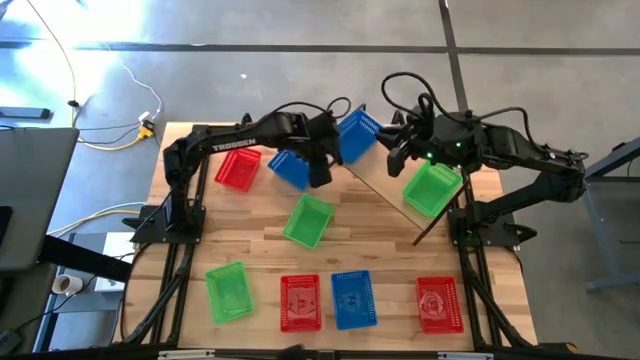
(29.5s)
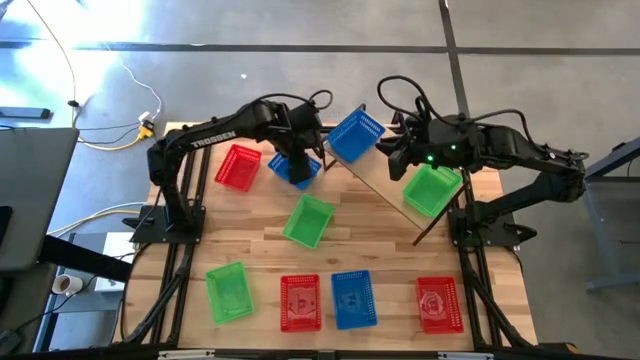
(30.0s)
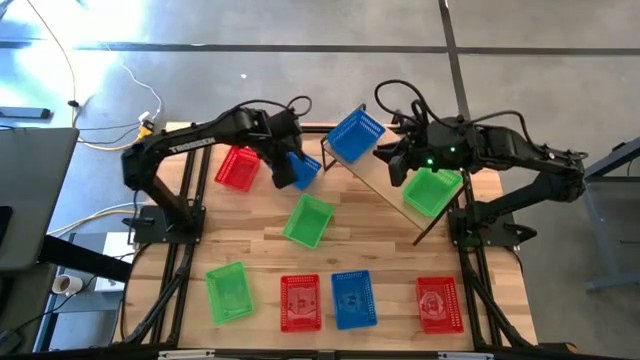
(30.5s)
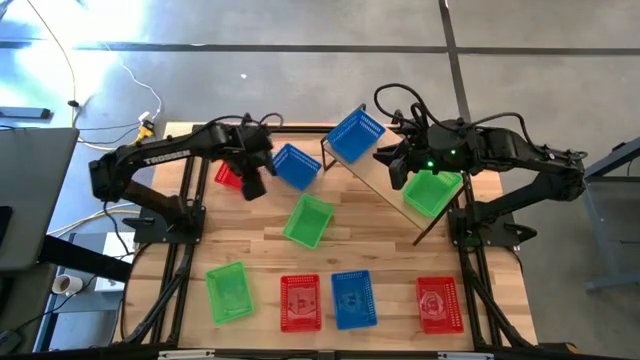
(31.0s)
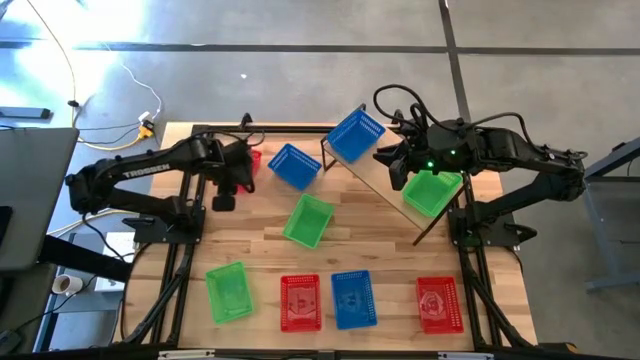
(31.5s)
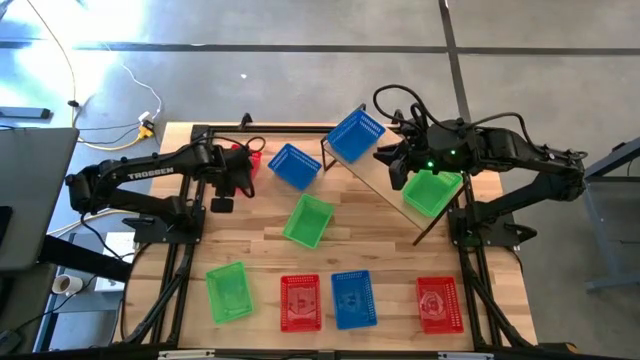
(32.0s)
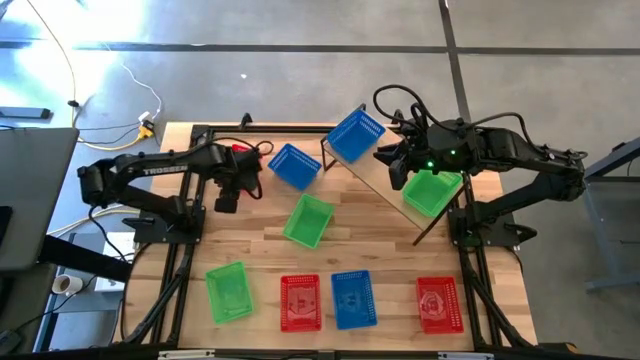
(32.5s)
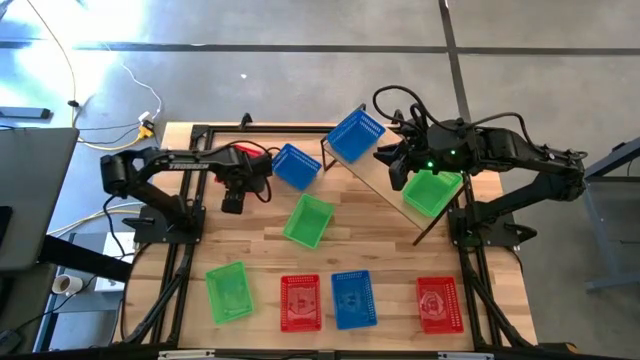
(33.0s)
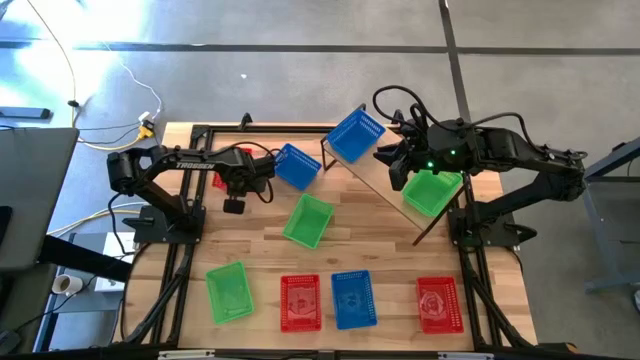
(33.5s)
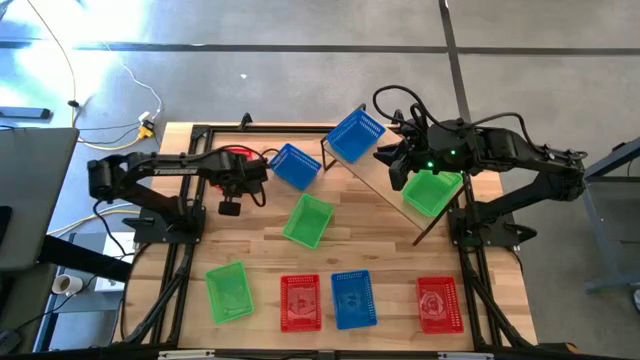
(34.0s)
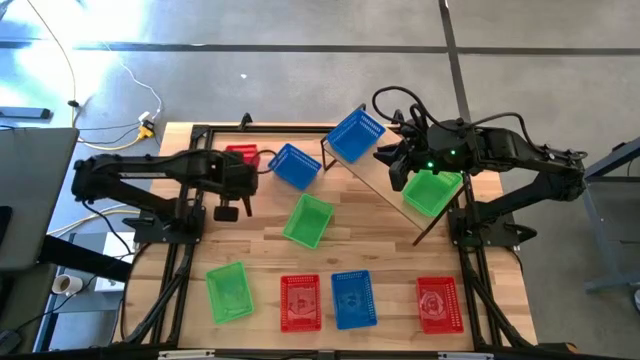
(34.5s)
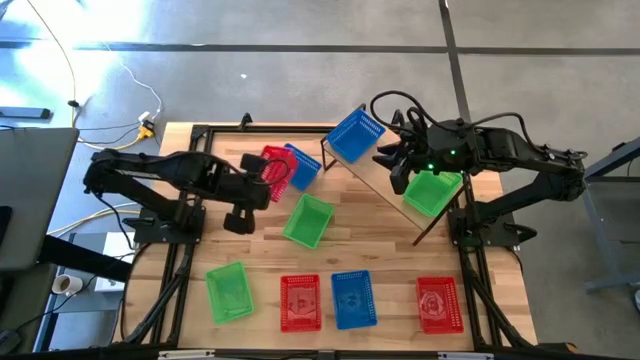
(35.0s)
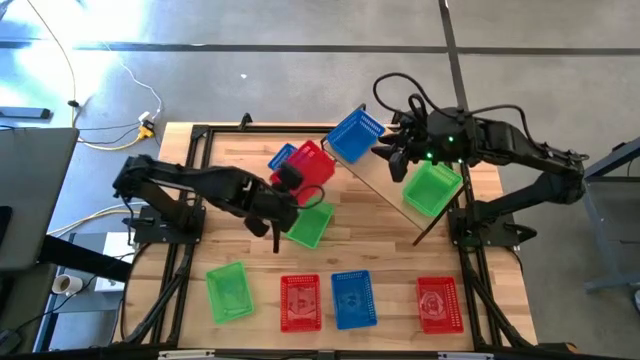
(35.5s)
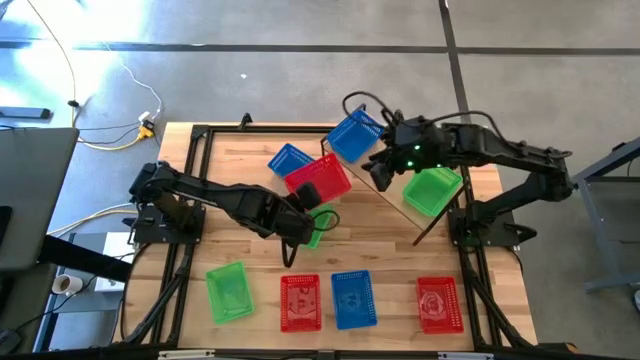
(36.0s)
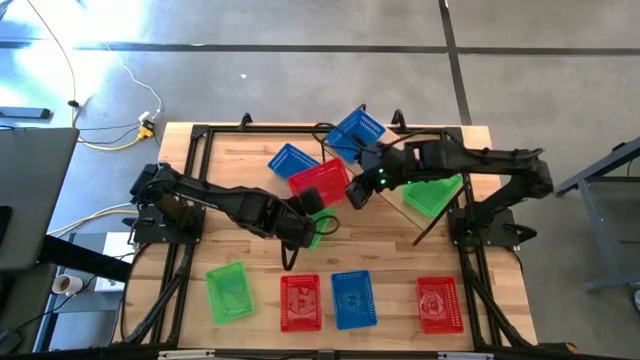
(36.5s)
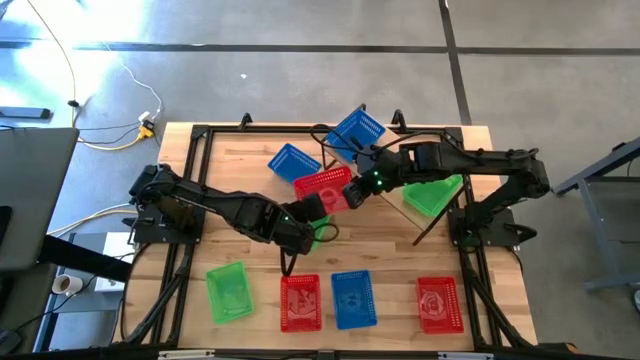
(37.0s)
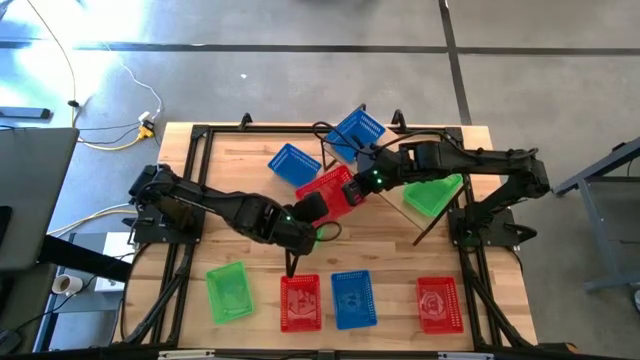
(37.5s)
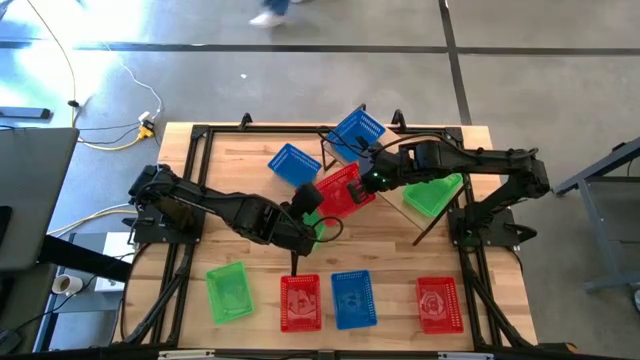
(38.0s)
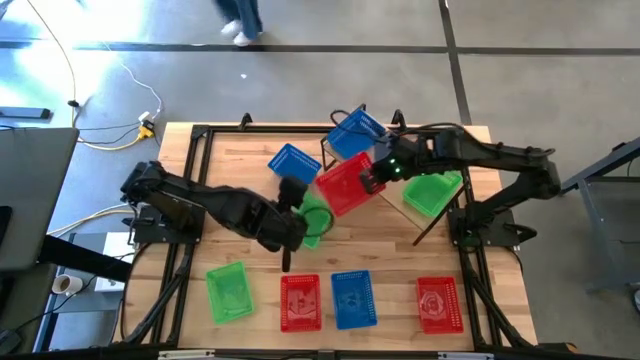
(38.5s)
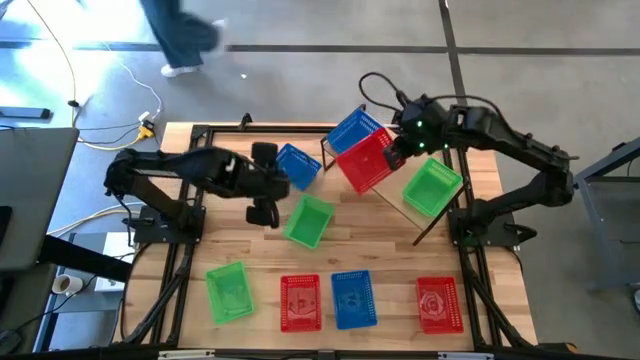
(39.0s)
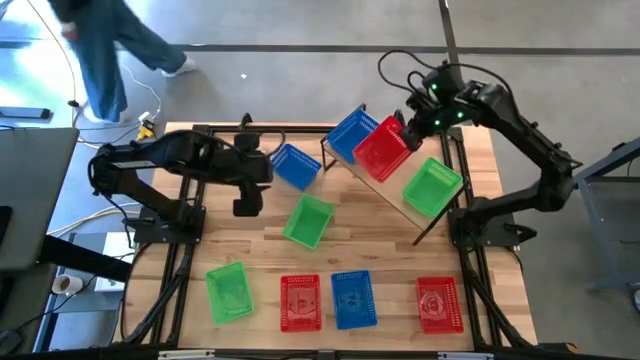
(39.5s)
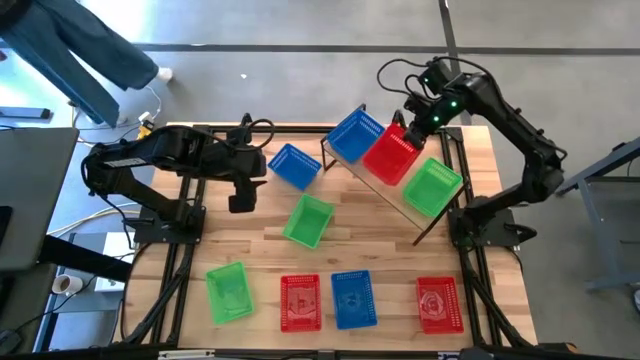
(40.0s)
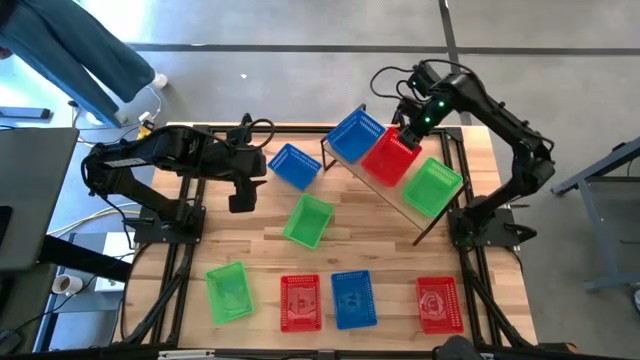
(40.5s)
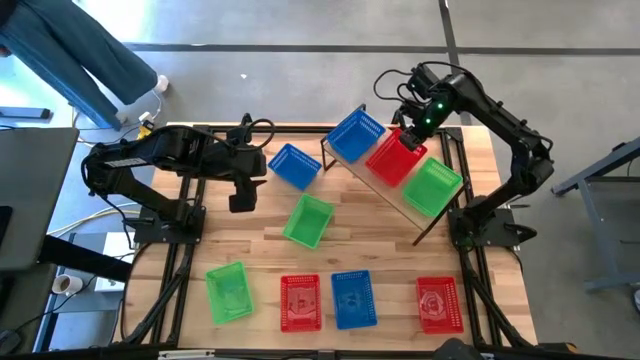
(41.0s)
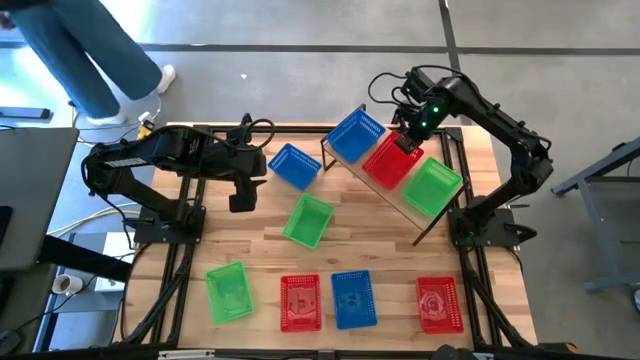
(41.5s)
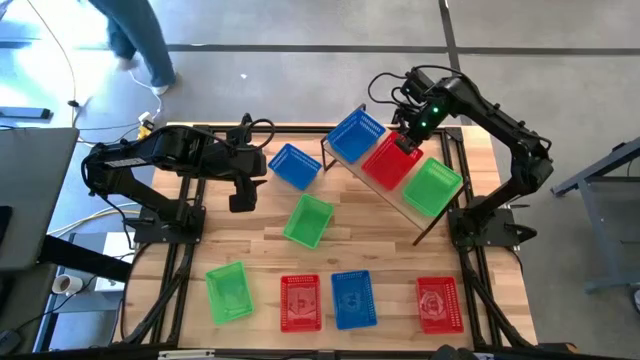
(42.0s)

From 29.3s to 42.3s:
Task: Stack baskets on shelf by color
Put the top red basket on the shelf

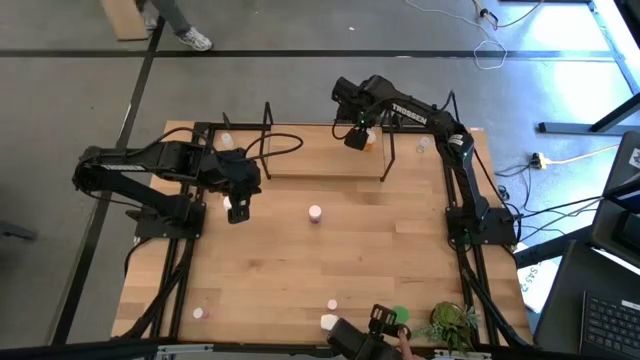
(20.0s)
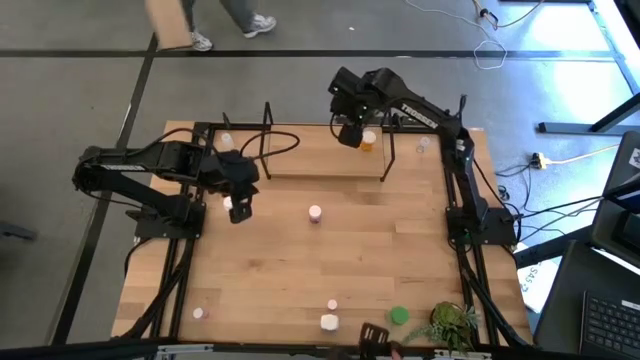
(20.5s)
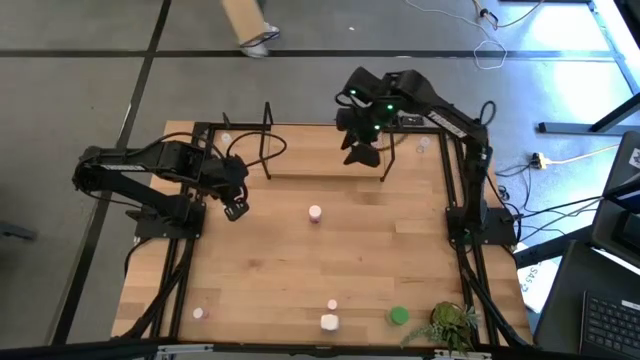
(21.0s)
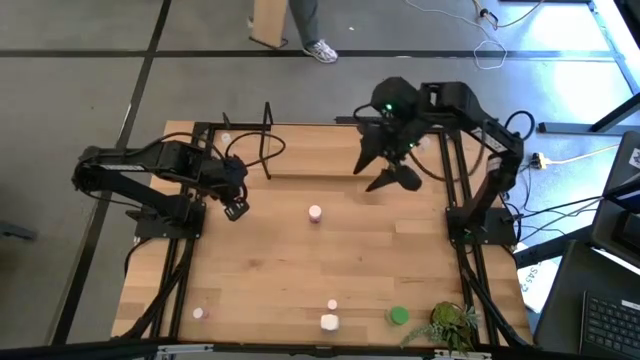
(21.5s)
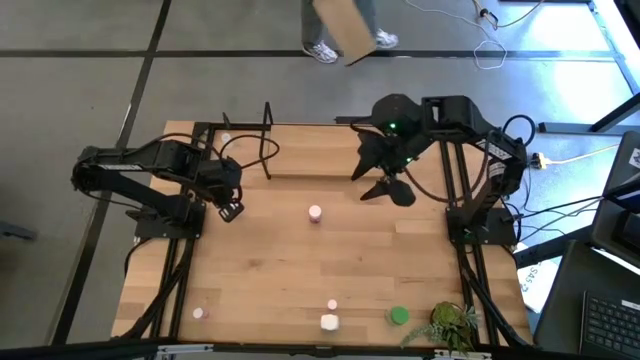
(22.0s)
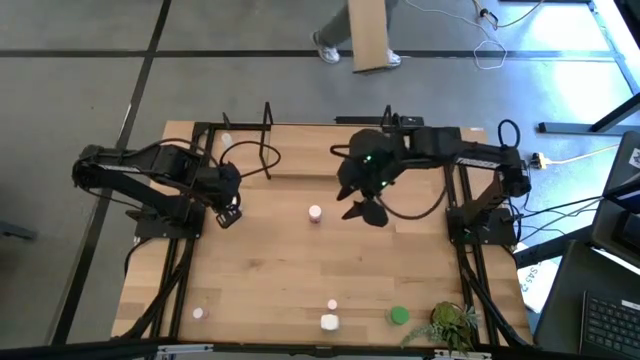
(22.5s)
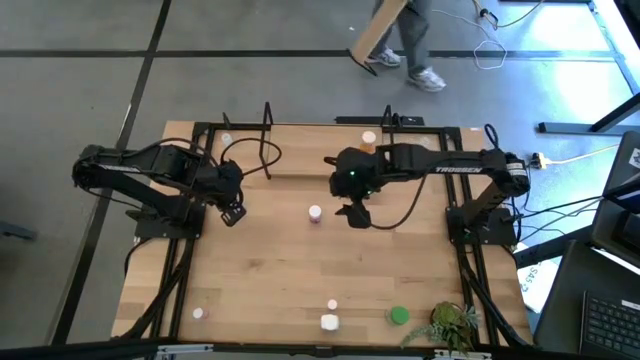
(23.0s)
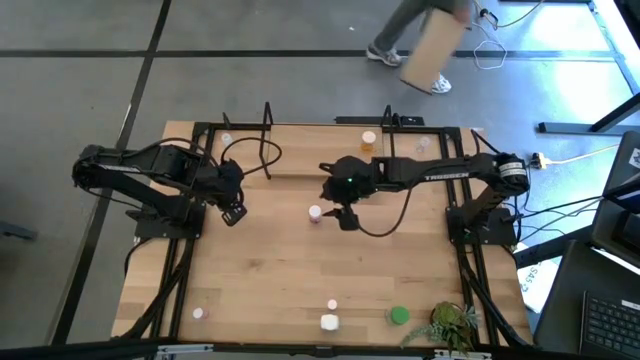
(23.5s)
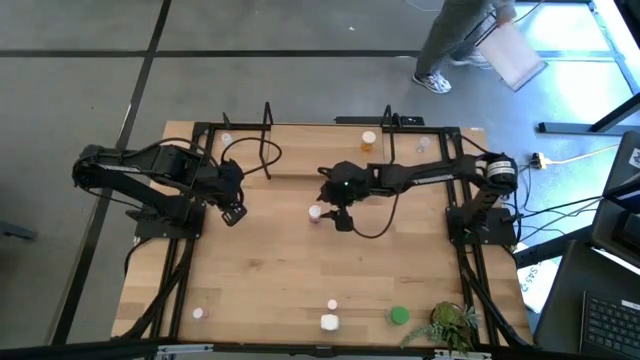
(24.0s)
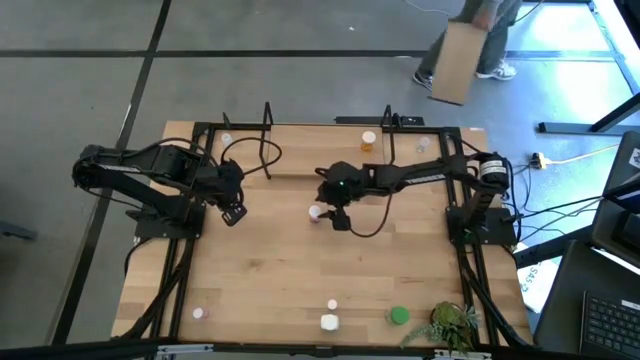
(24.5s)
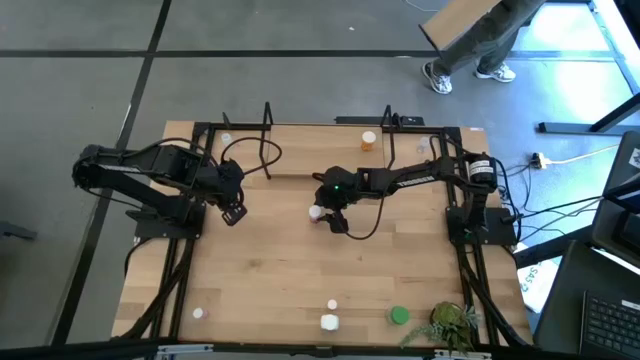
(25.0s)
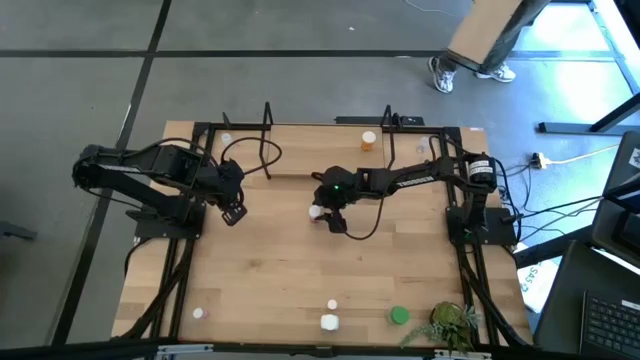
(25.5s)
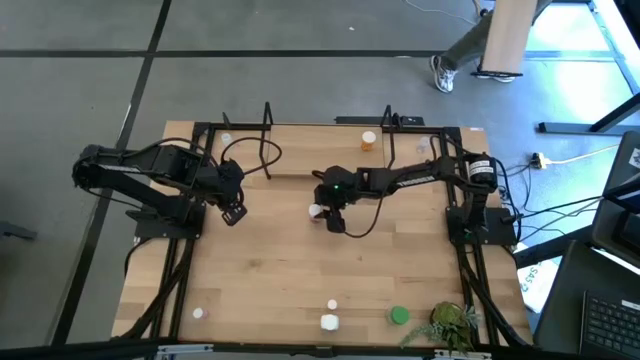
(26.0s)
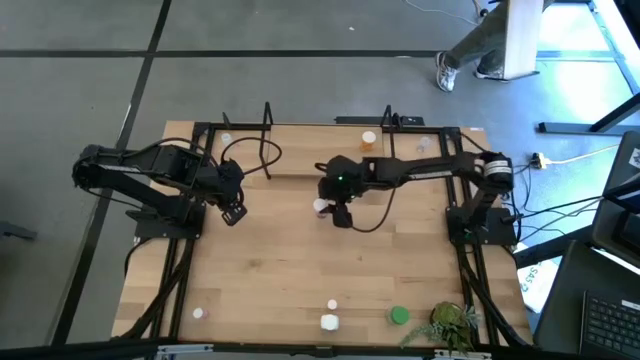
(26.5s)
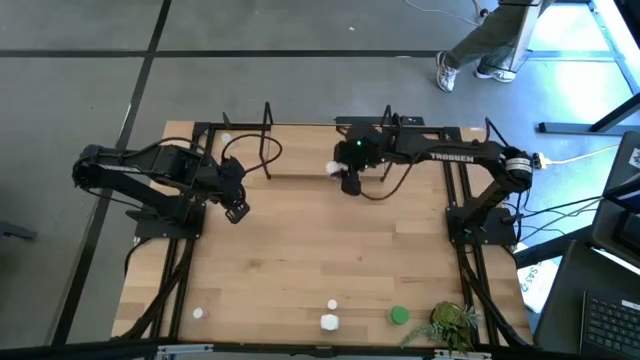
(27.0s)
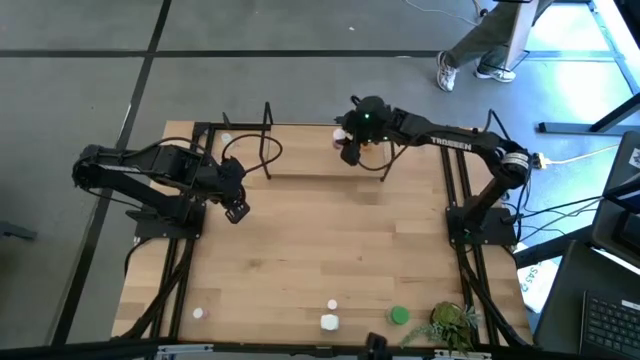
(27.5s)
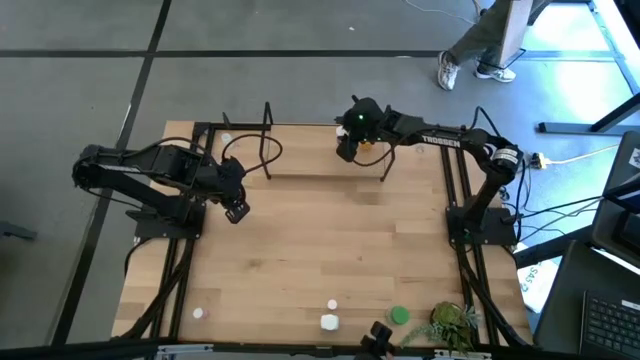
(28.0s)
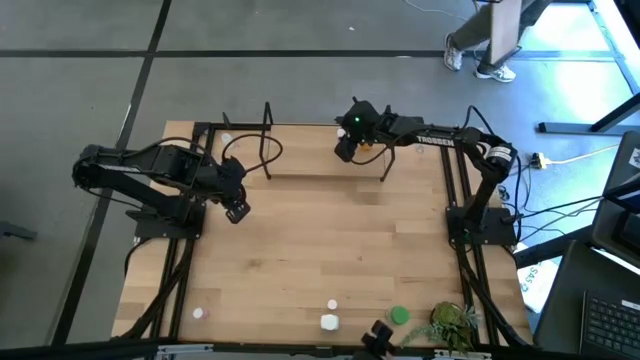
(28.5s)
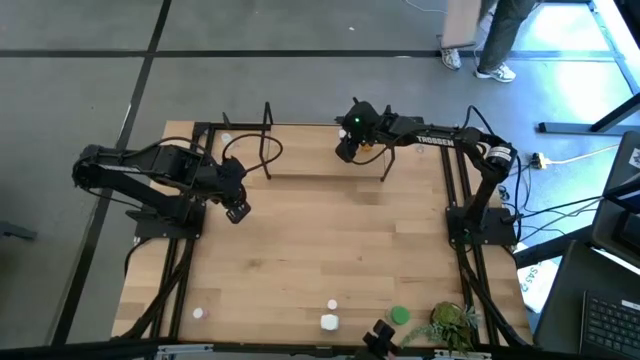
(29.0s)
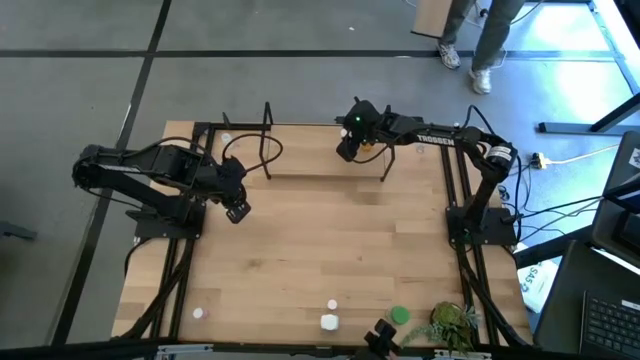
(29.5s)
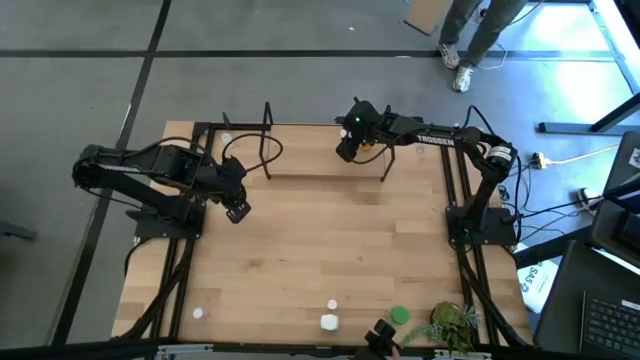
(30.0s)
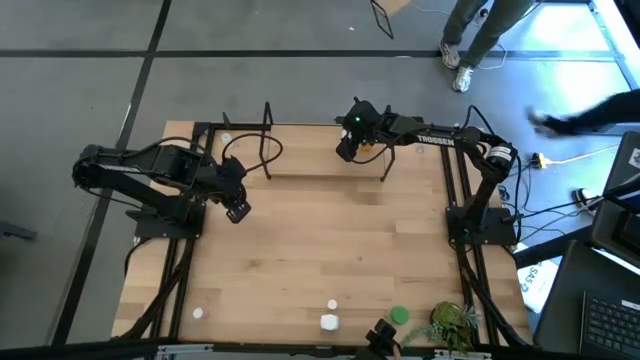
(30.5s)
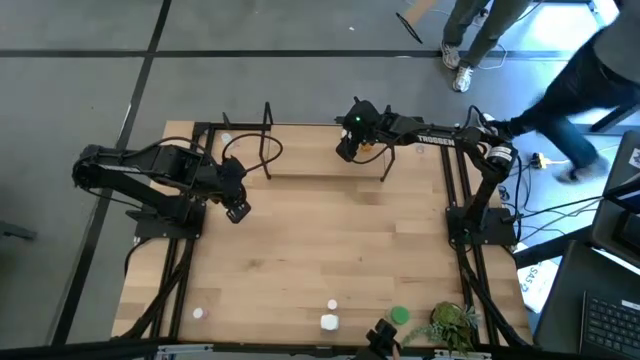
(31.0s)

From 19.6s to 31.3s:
Task: Pick and place medicine bottles onto shelf by color
Put the white and pink pill bottle on the shelf
